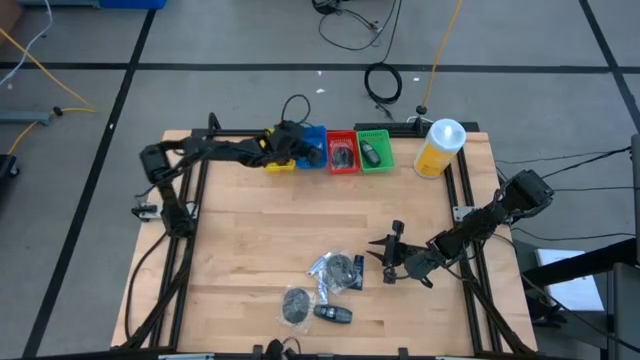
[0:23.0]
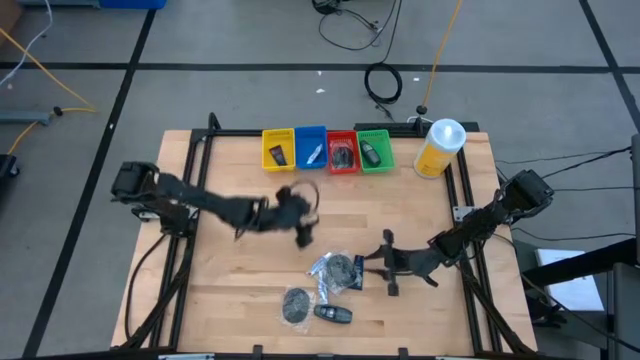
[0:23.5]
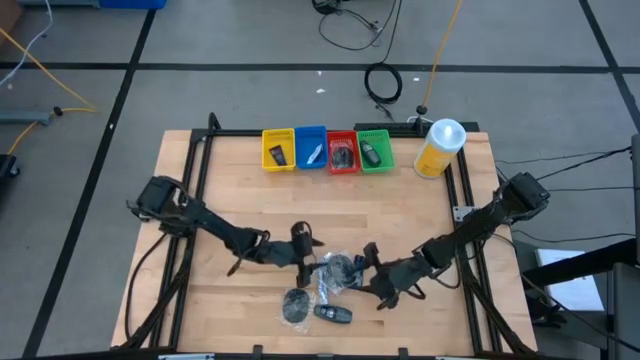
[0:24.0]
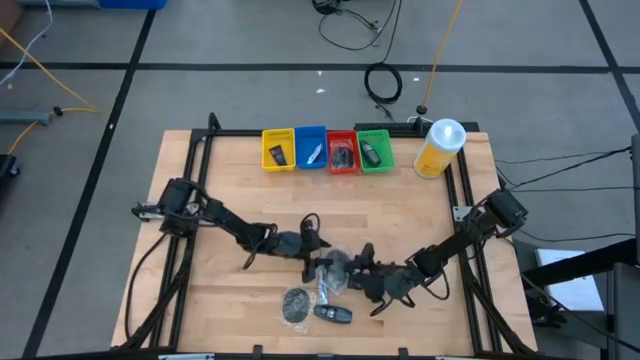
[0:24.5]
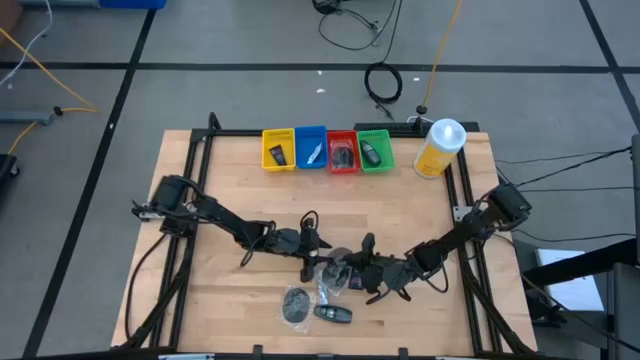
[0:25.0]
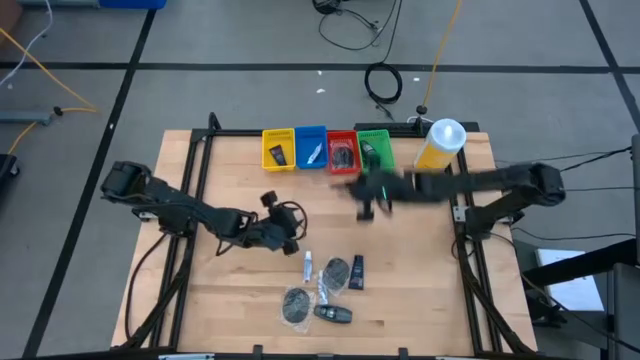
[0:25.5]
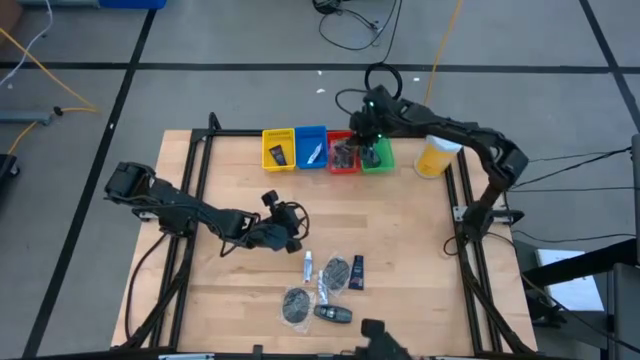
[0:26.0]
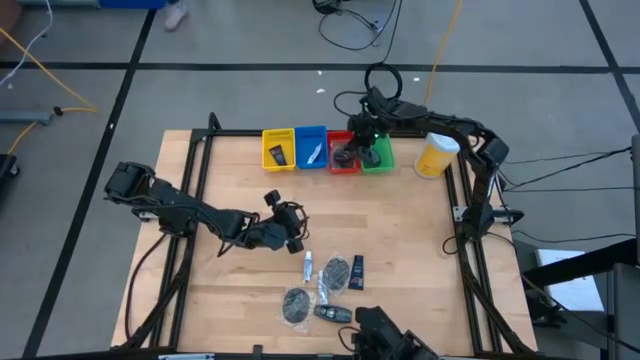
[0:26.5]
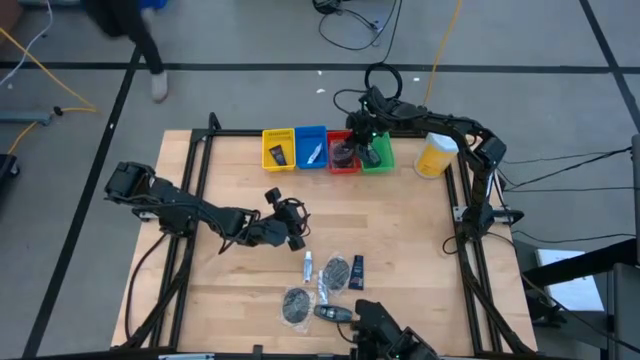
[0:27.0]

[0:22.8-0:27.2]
Task: Pick & Place Travel size toiletries
Put the black hairbrush into the red basket

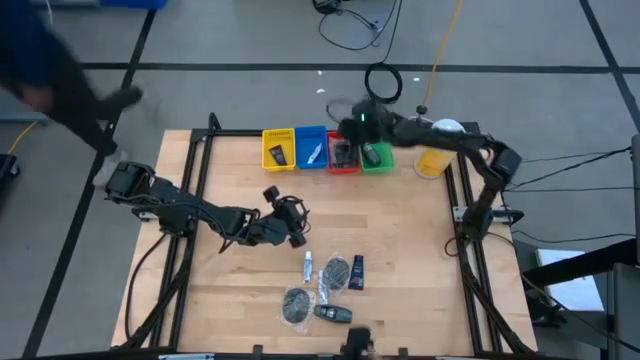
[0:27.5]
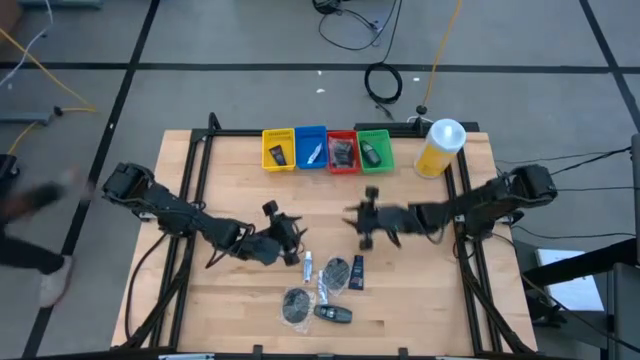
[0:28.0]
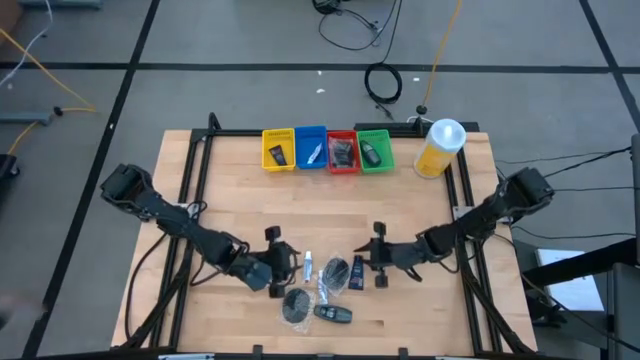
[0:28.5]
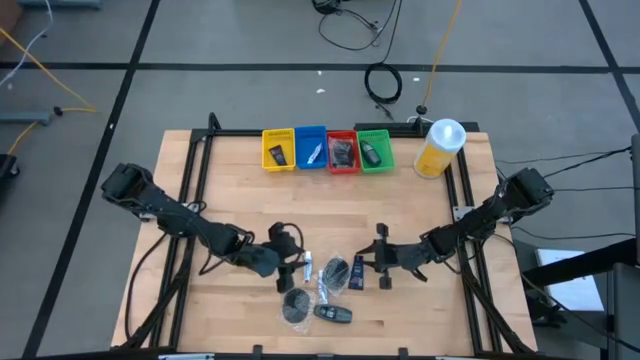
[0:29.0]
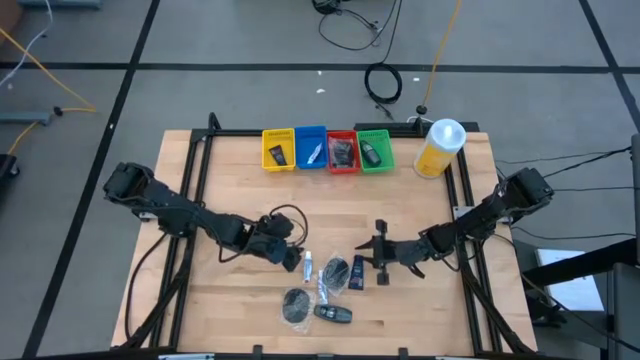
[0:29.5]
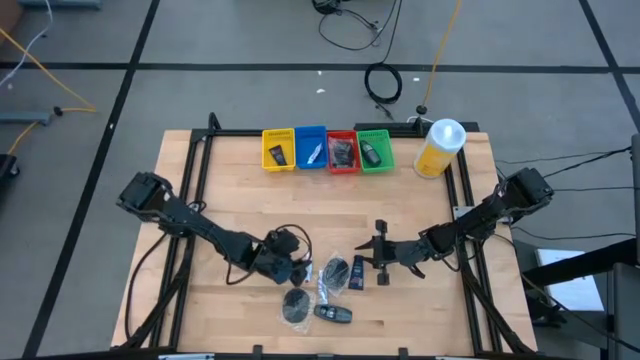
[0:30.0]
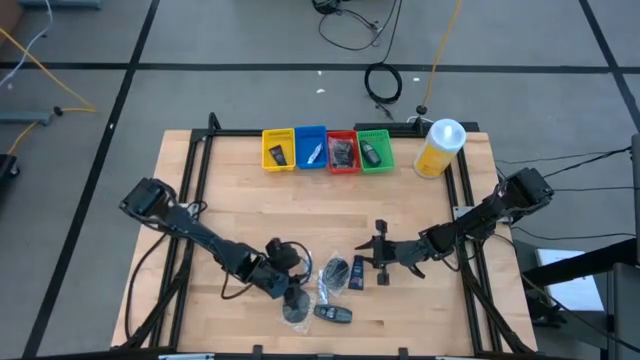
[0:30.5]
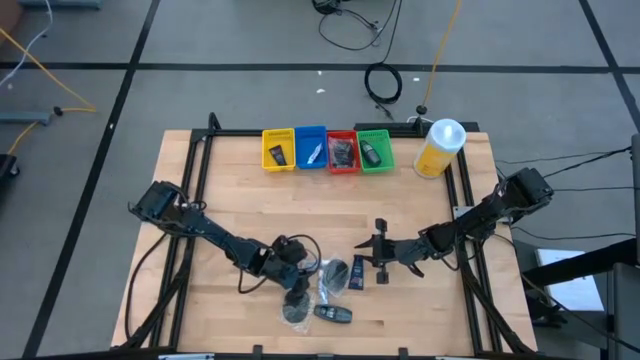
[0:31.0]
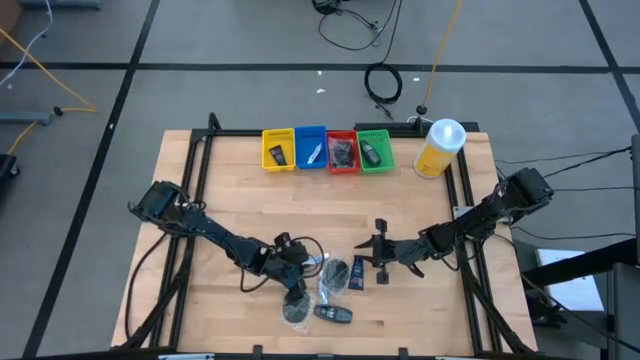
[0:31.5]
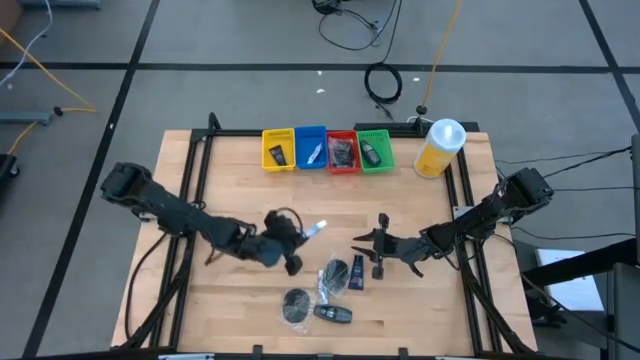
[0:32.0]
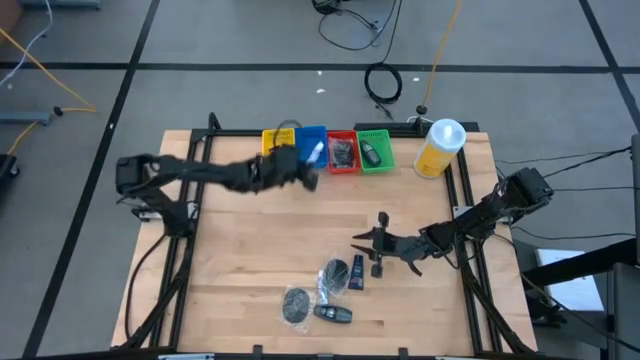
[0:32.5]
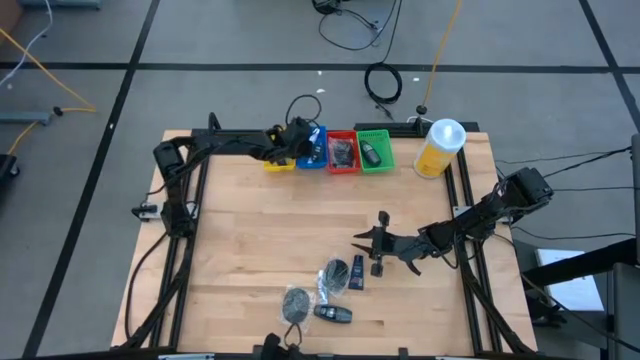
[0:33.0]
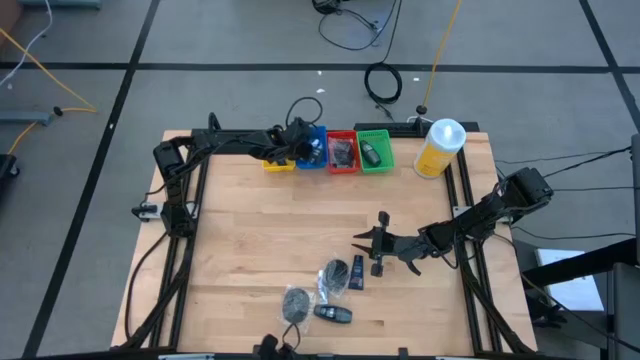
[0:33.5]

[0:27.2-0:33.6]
Put the white toothpaste into the blue basket

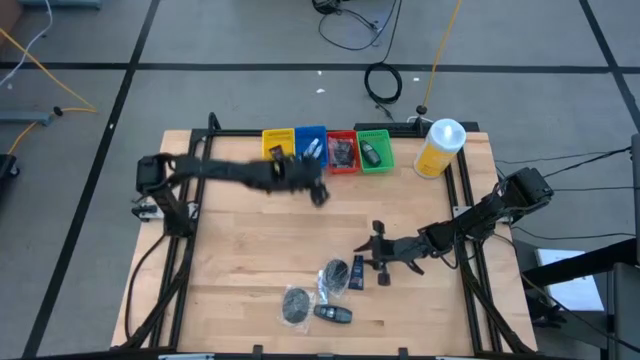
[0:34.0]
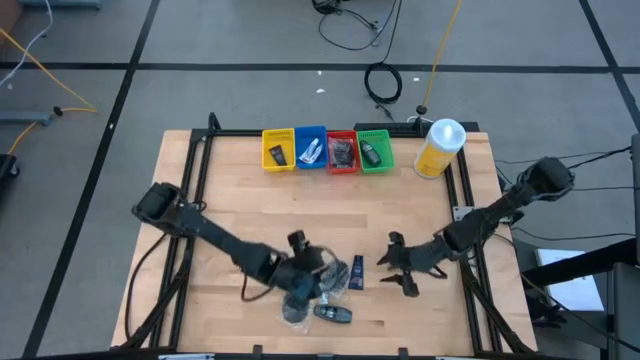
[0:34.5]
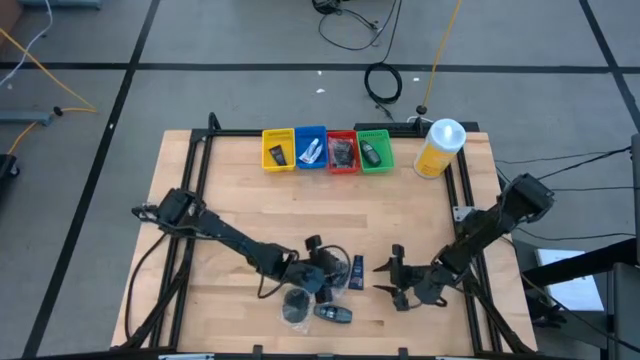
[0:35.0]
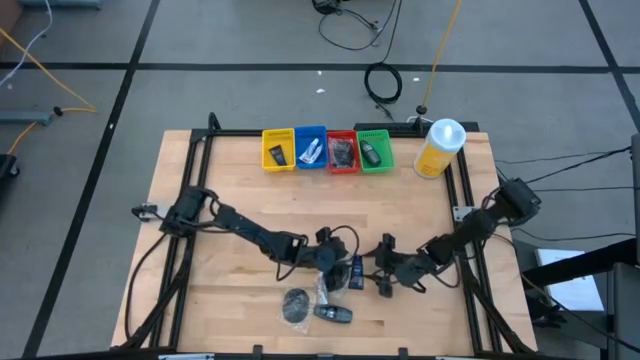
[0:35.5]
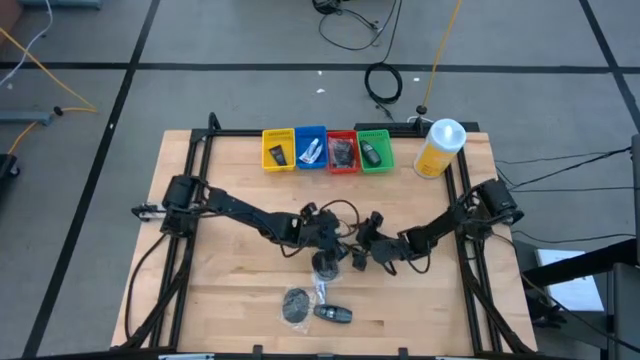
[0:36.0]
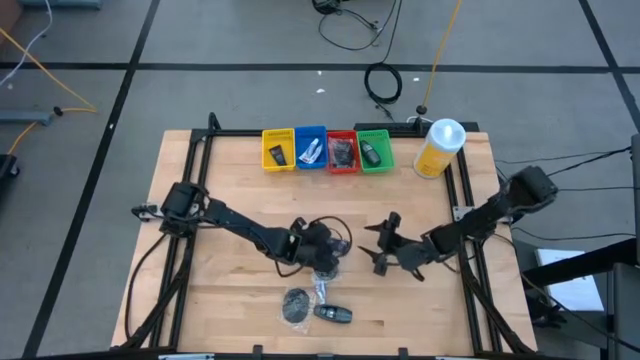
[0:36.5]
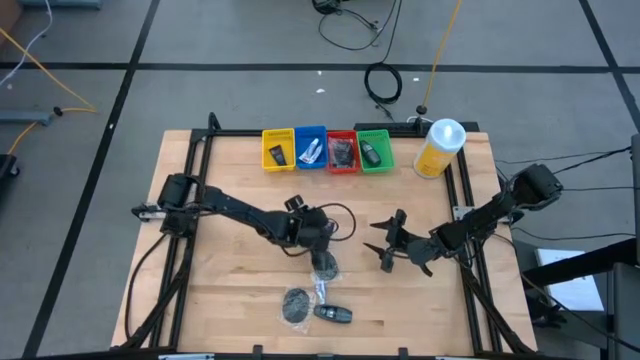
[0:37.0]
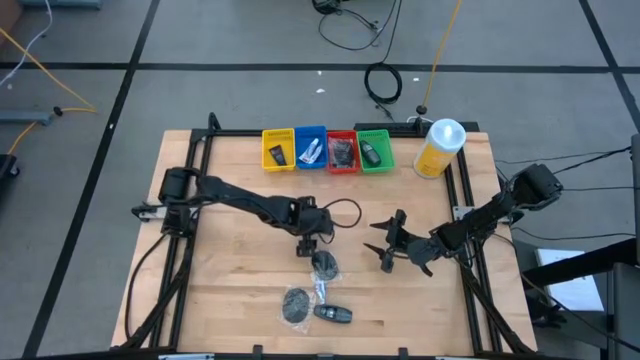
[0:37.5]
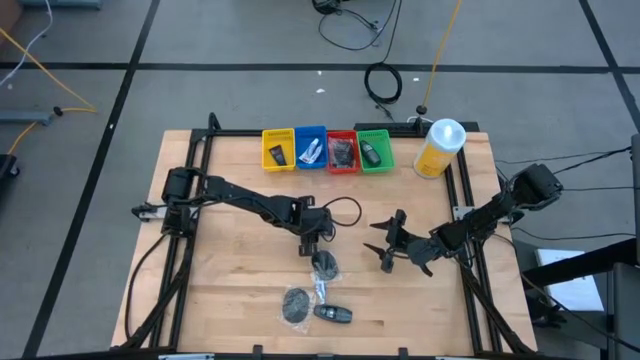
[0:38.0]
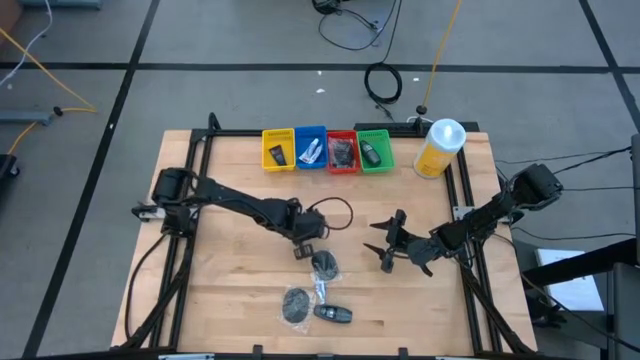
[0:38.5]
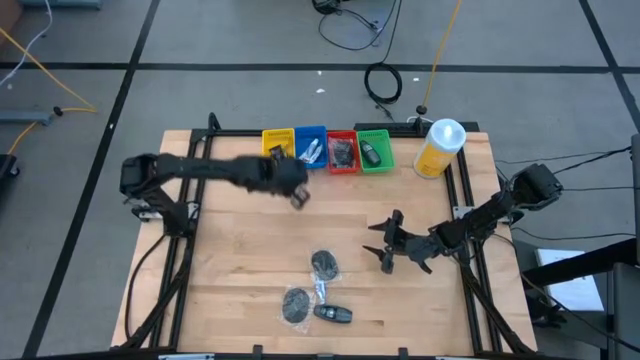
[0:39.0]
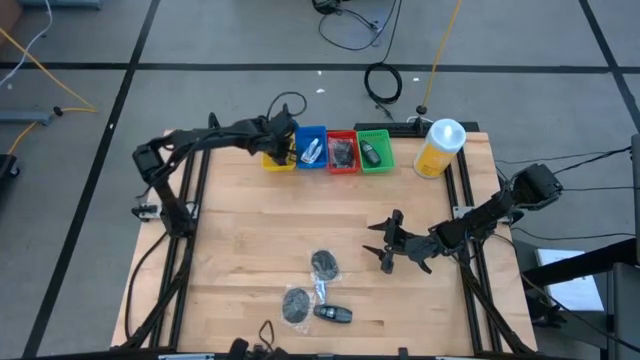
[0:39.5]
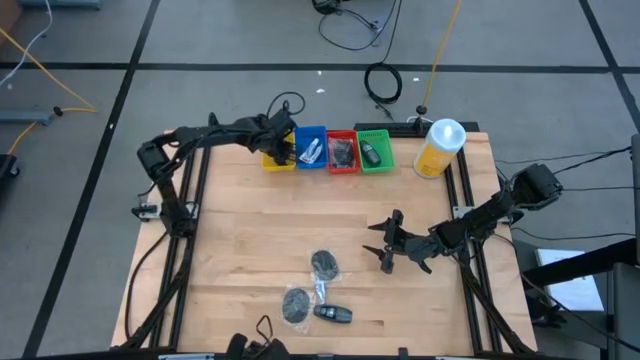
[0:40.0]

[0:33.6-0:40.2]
Put the blue shave cream into the yellow basket

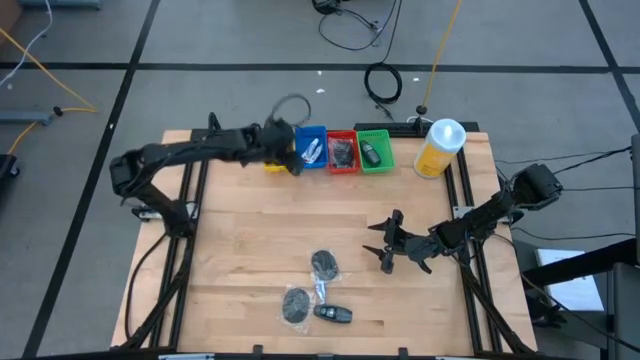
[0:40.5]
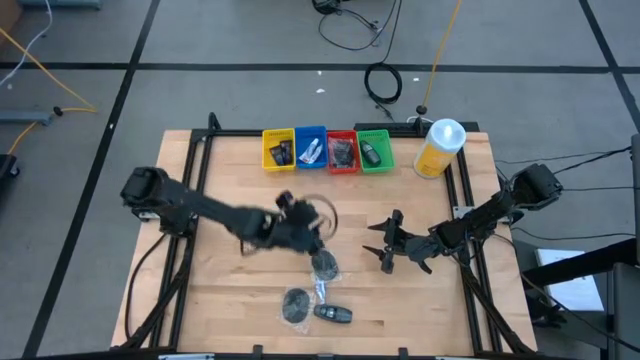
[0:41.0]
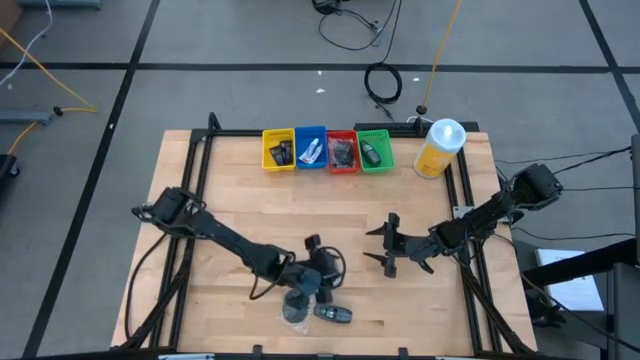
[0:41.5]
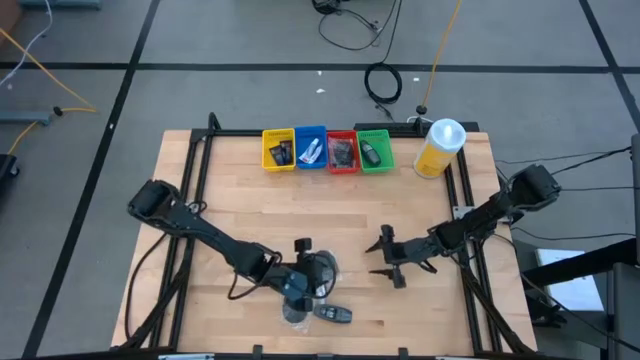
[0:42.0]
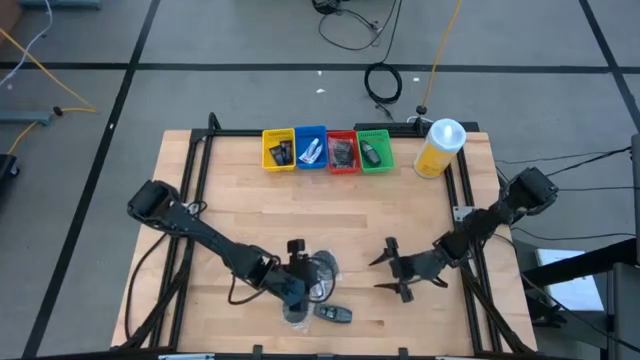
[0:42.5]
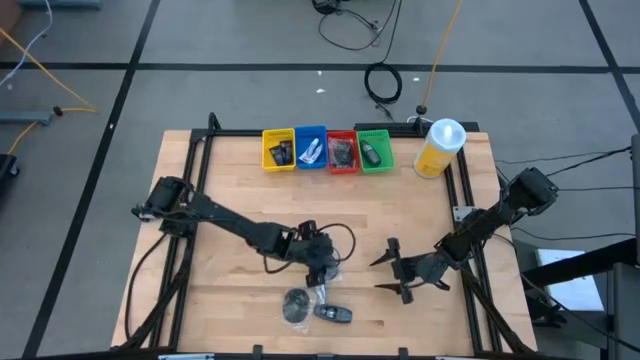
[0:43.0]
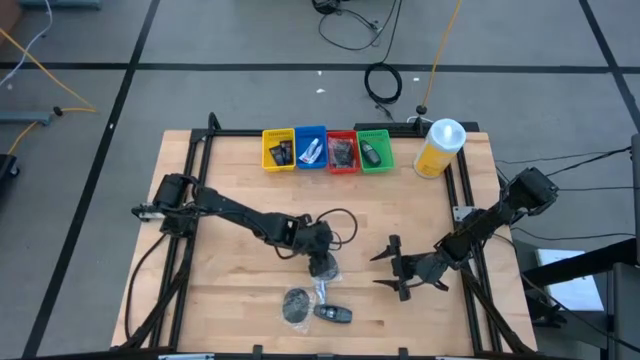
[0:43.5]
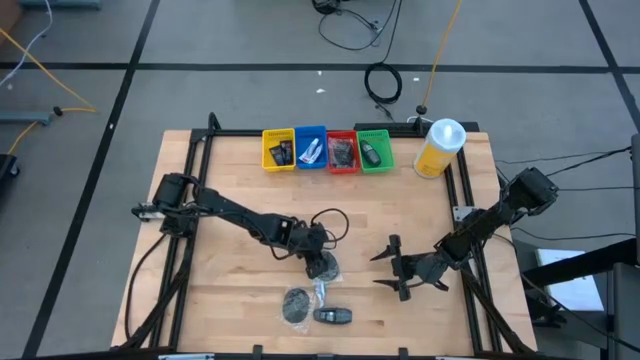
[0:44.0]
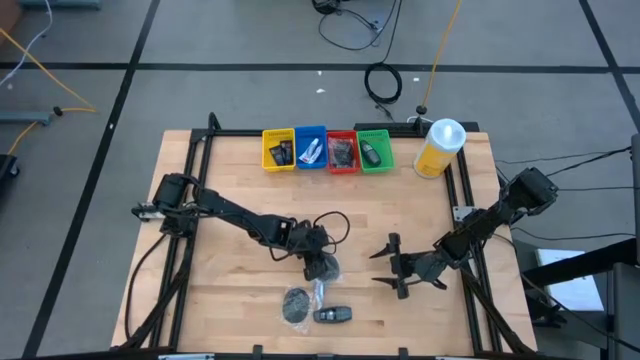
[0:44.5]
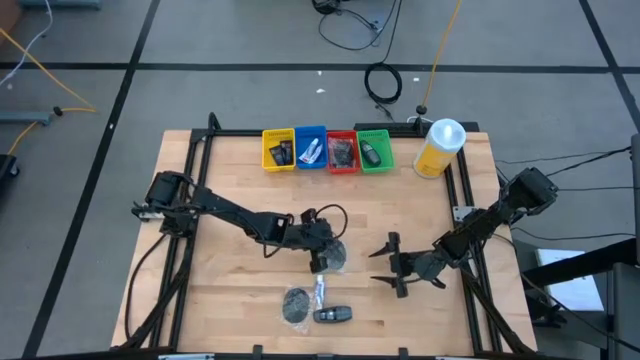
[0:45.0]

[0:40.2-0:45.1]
Put the black hairbrush into the red basket
